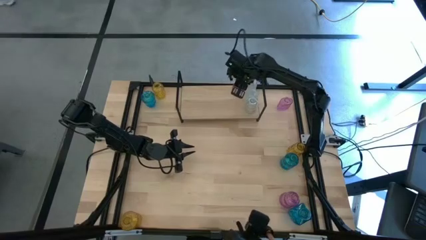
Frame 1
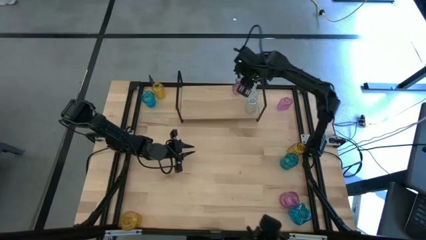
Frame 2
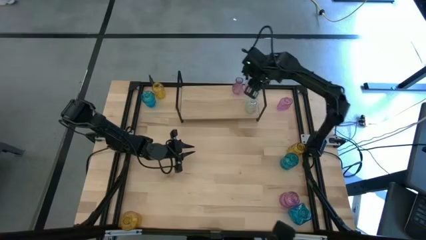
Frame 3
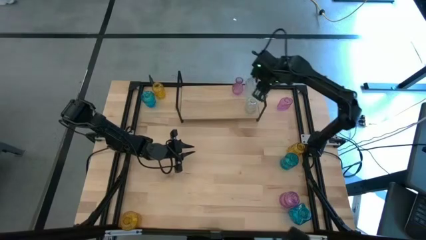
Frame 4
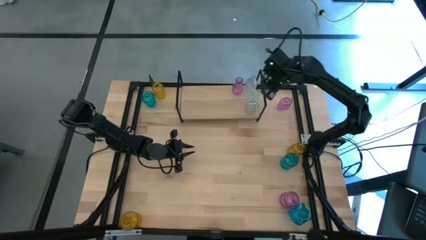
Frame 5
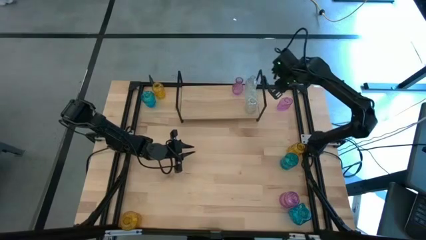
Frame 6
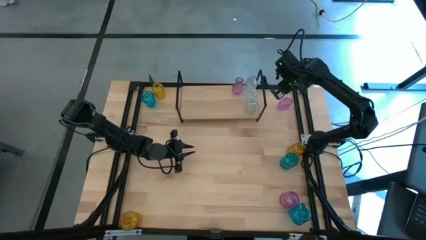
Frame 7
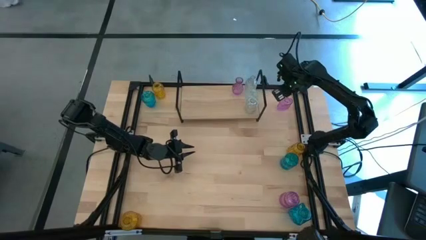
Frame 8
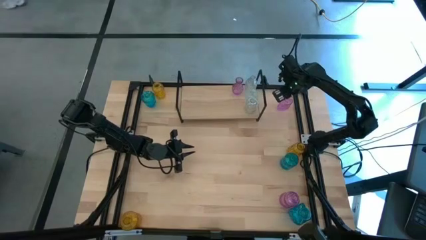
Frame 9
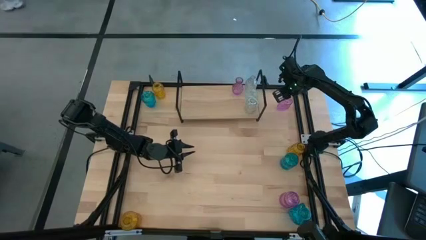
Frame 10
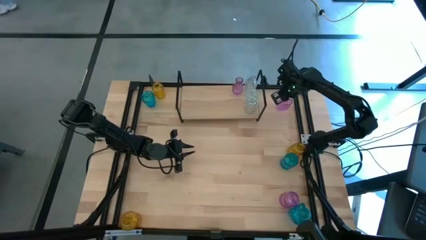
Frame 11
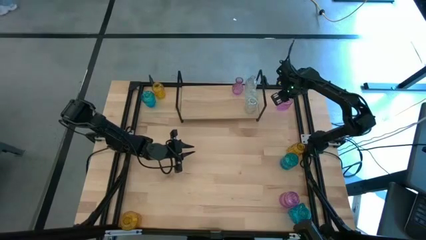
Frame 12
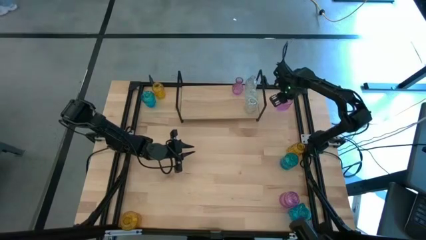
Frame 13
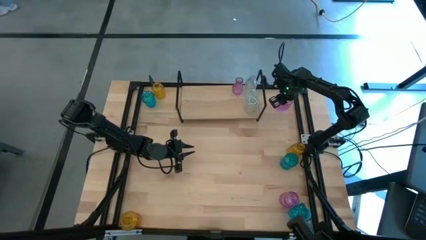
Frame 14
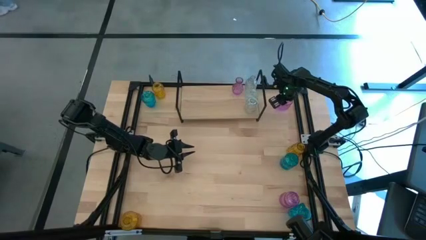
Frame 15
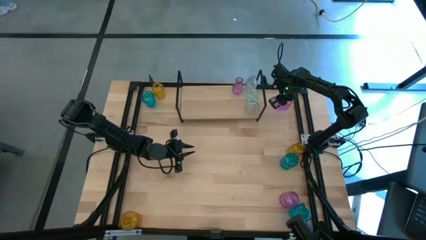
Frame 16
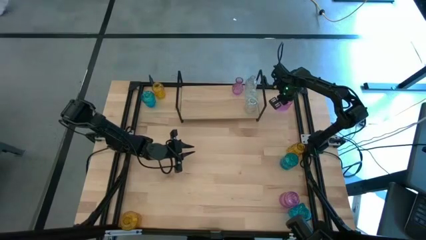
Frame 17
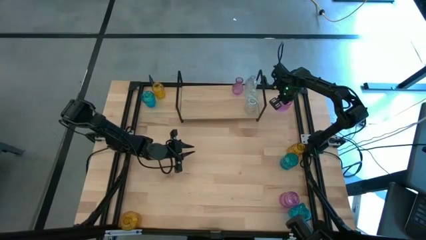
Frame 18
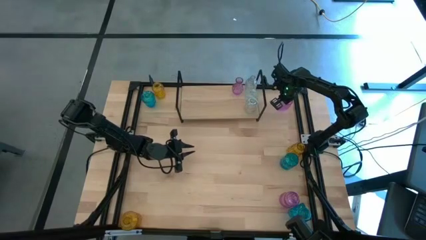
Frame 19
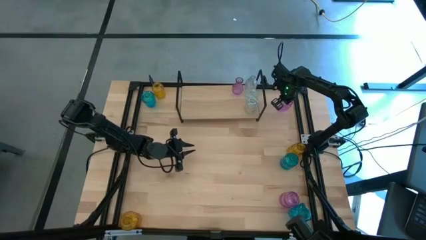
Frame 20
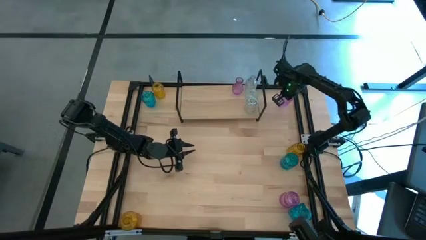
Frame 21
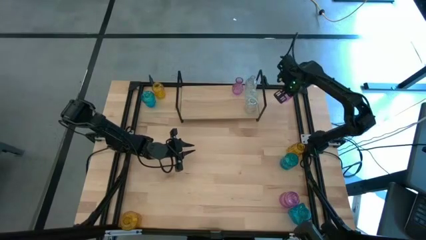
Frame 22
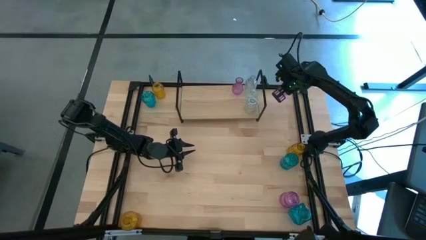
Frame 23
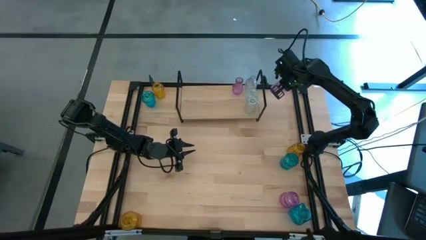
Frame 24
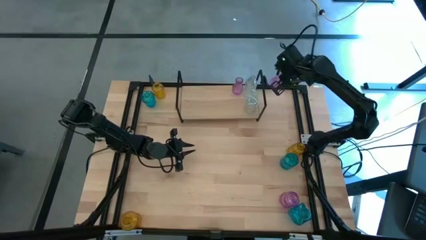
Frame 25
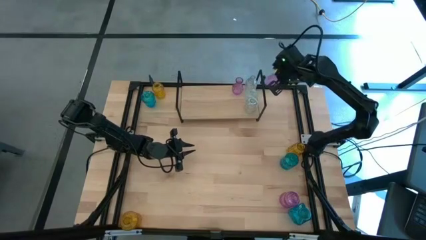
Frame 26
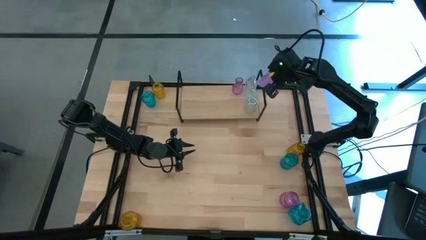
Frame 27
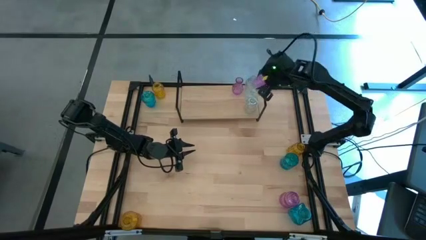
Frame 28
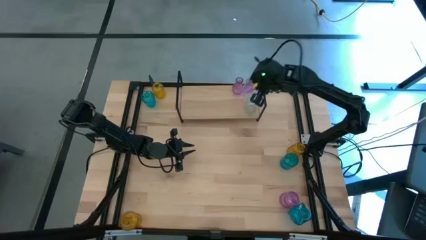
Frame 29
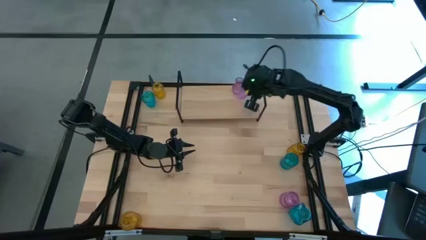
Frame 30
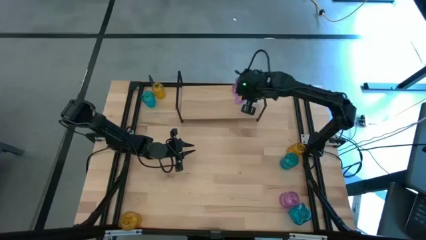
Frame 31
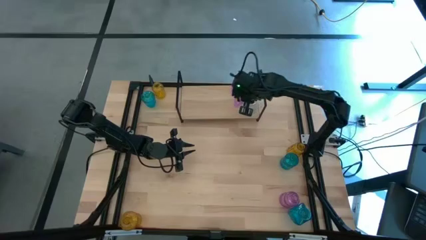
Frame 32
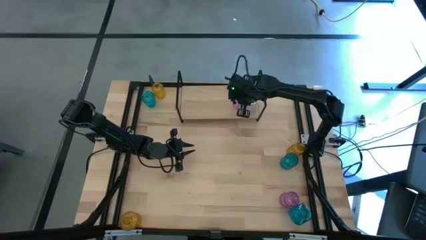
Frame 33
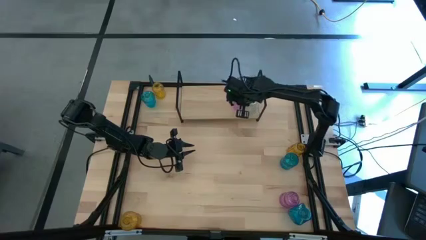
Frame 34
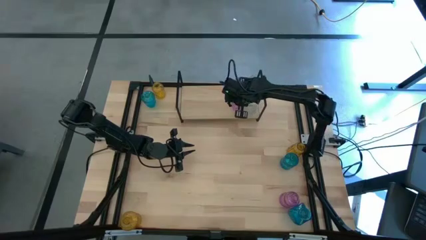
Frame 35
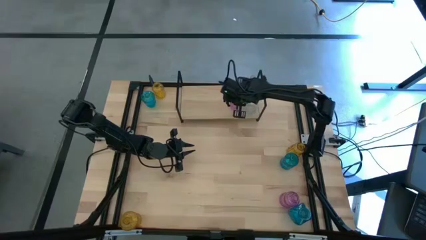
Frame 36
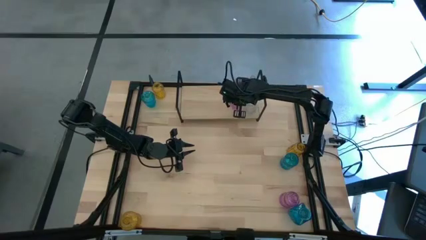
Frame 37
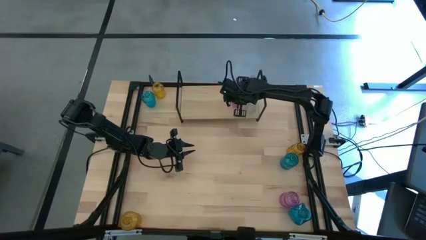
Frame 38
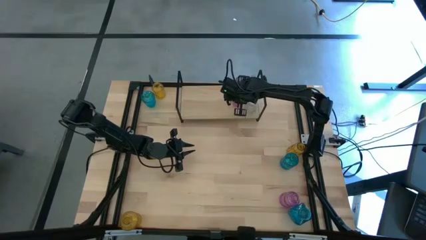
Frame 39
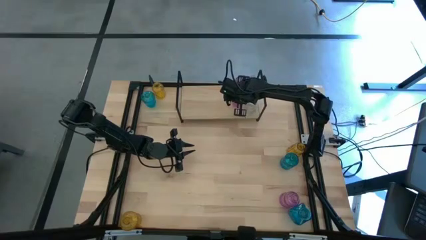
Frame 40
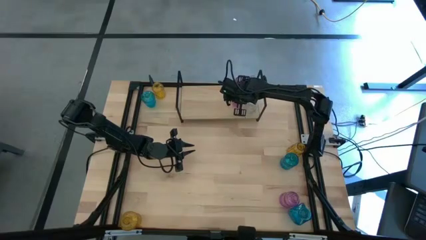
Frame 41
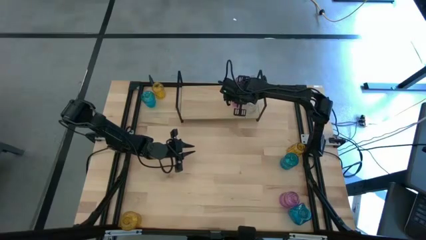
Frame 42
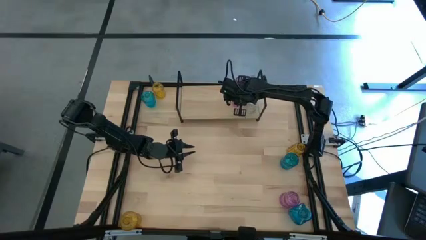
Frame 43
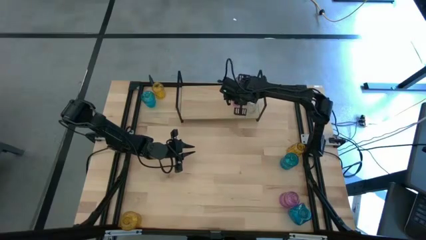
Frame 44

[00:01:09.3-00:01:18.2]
Task: sort vases onto shelf
Put the top violet vase aligned with the other violet vase on the shelf

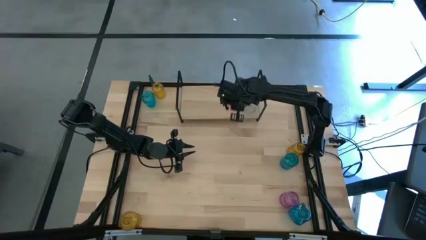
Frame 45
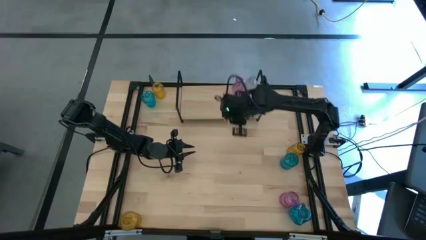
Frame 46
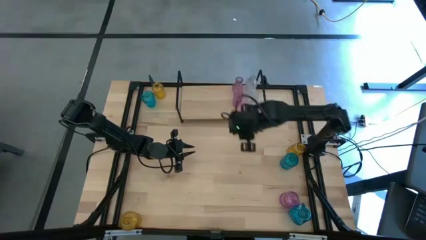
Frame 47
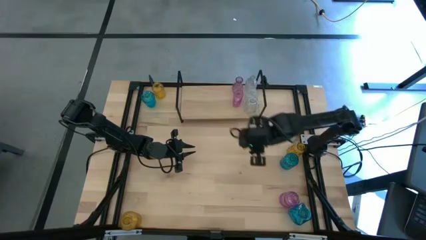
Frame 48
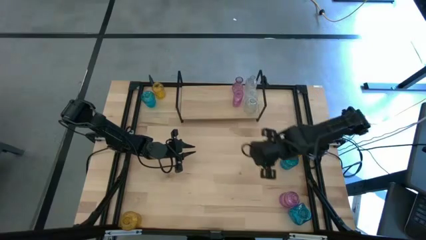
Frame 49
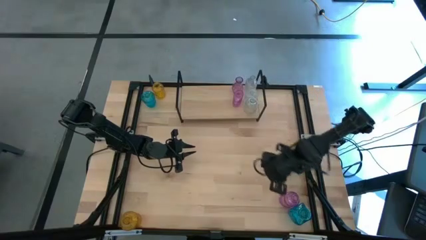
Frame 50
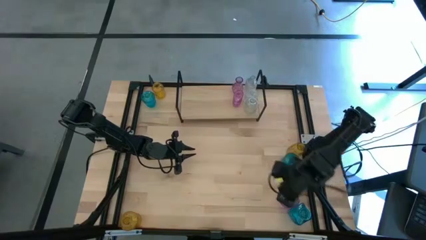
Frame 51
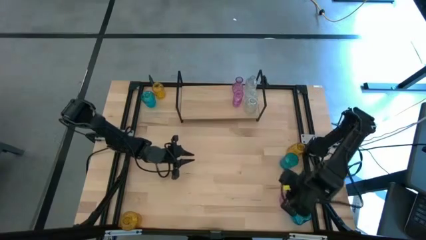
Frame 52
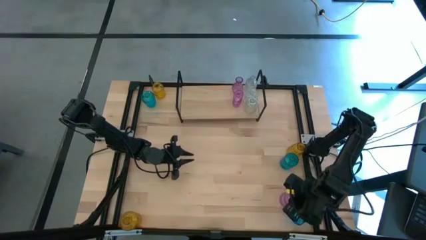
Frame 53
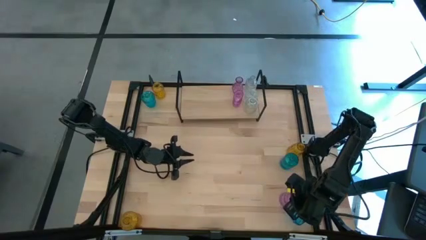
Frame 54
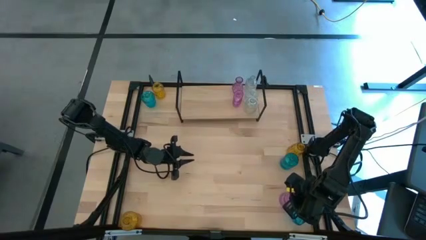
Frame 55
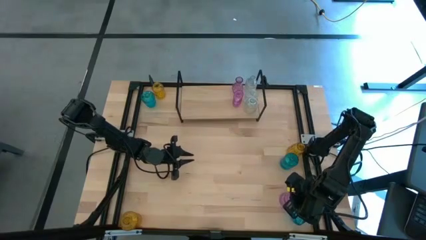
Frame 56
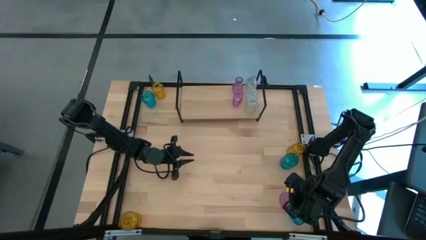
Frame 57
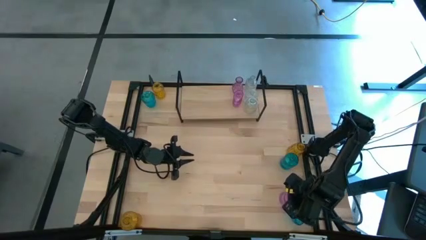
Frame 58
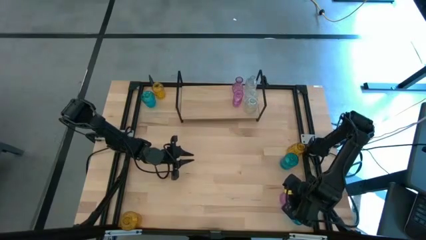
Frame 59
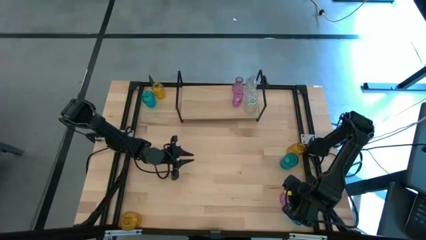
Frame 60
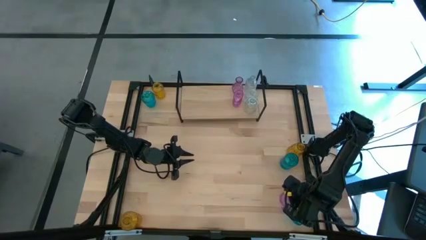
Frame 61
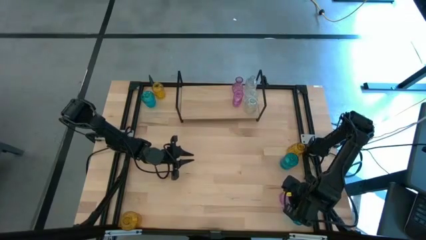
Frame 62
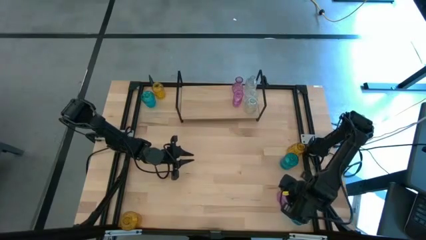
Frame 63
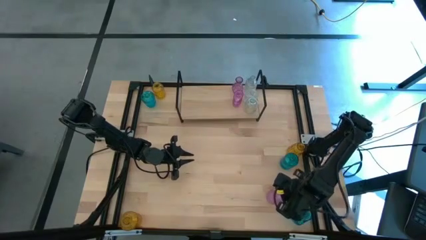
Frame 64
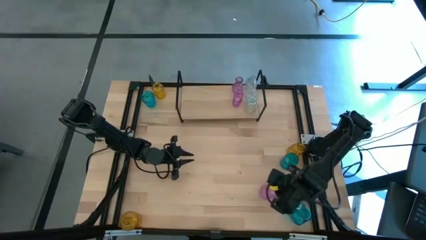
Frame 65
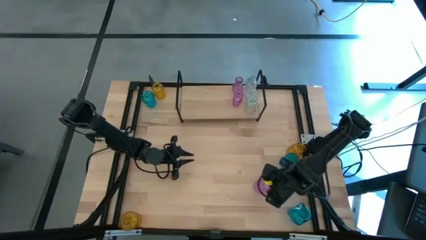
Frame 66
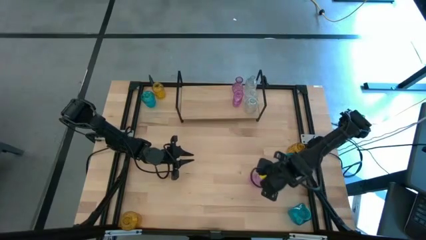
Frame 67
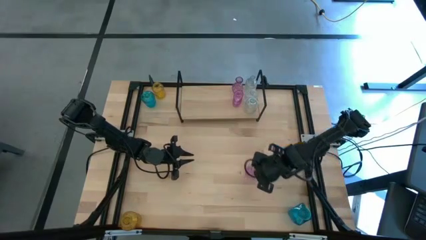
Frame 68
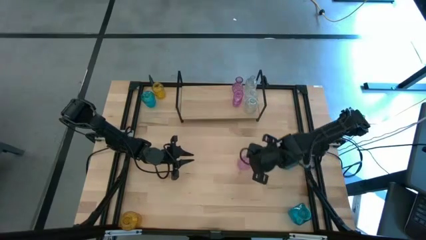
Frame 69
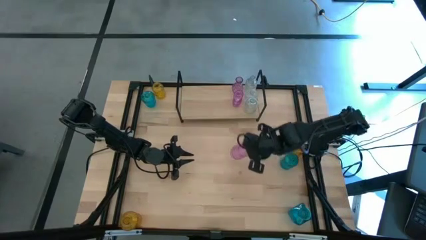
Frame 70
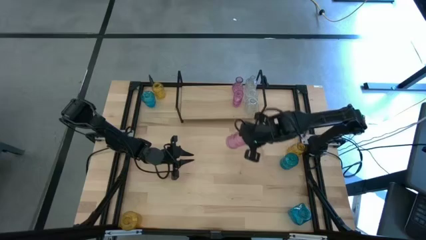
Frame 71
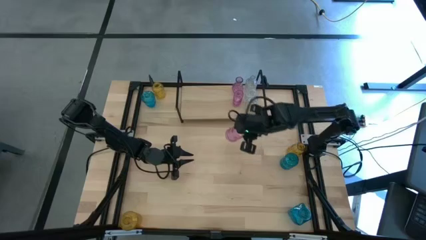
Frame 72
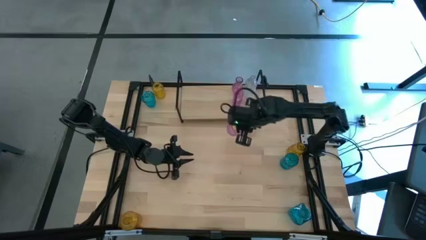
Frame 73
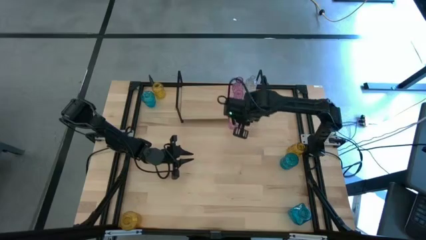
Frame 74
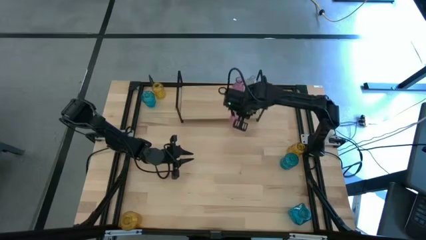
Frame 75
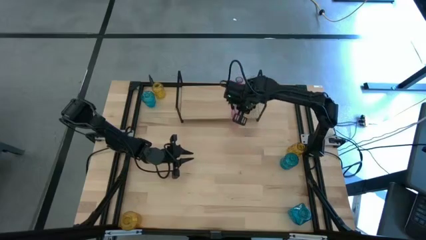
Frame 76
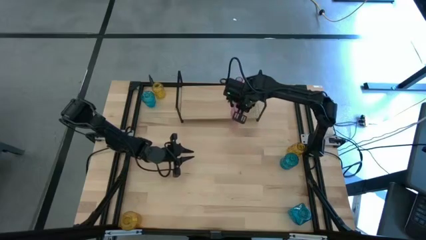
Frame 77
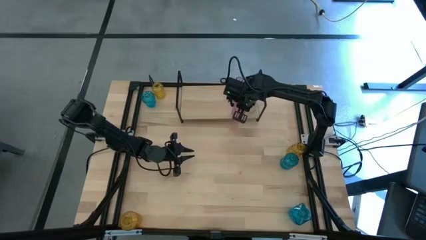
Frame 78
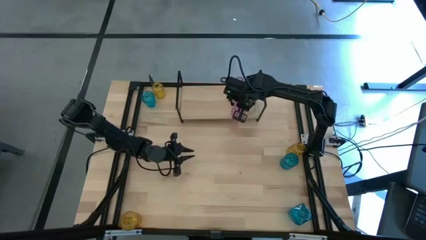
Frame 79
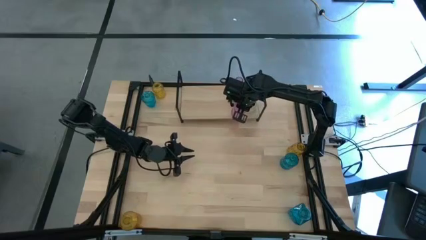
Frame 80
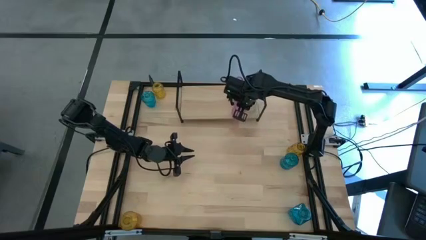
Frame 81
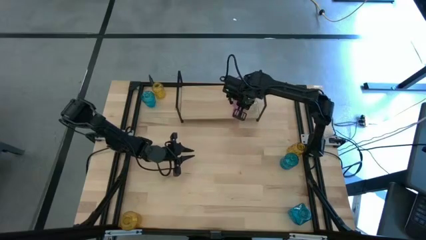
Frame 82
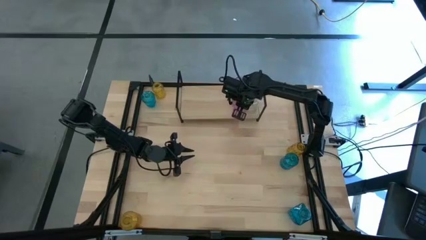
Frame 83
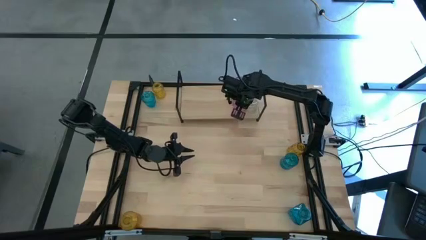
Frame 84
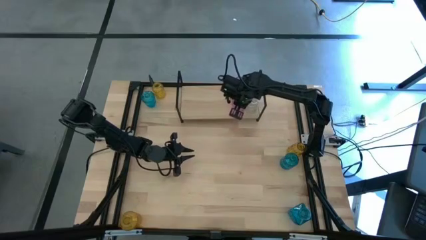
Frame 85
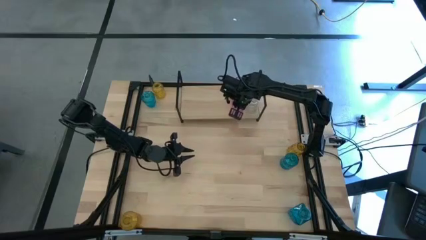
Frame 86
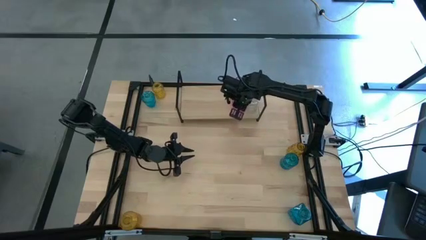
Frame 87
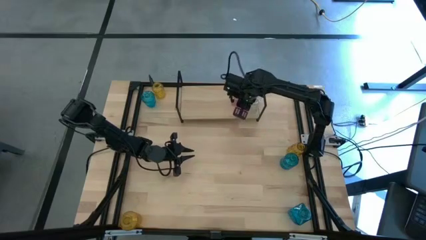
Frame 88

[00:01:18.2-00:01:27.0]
Put the violet vase aligned with the other violet vase on the shelf
